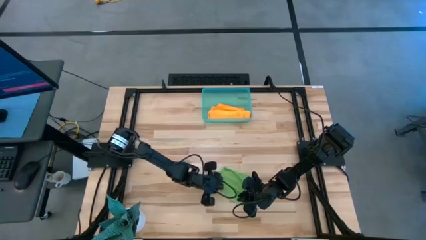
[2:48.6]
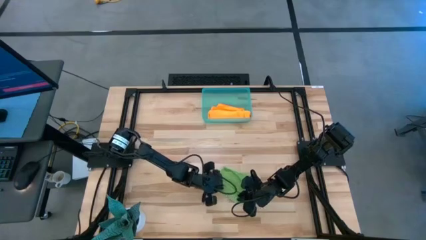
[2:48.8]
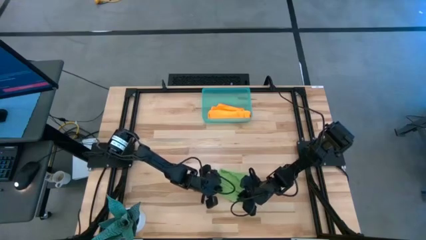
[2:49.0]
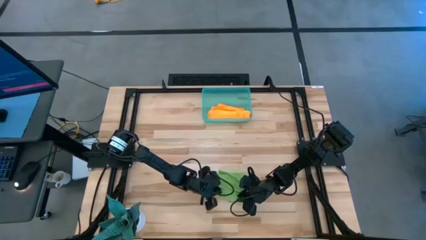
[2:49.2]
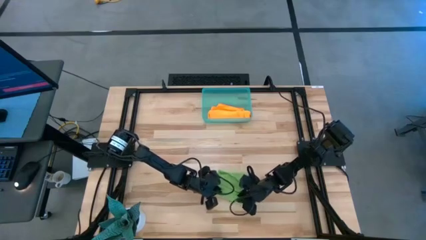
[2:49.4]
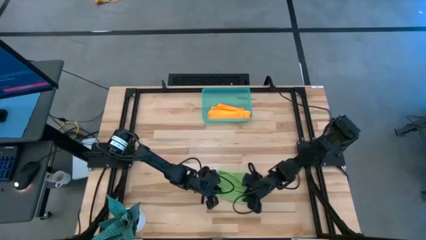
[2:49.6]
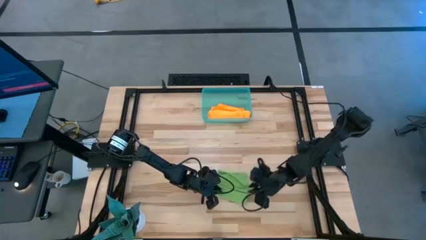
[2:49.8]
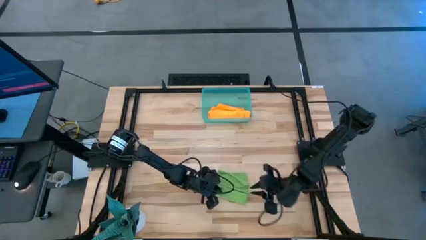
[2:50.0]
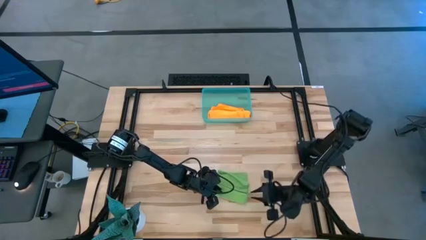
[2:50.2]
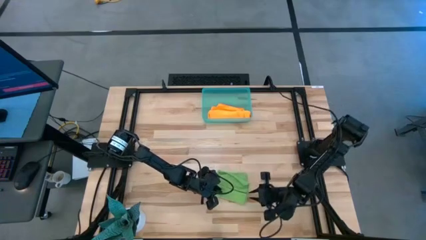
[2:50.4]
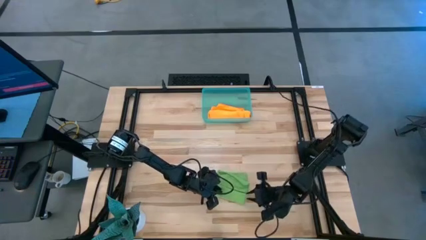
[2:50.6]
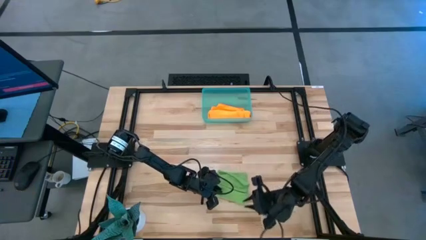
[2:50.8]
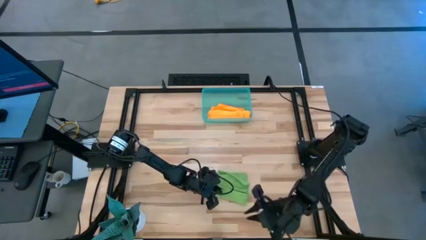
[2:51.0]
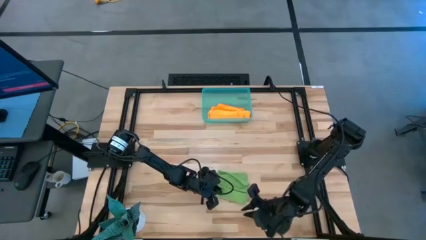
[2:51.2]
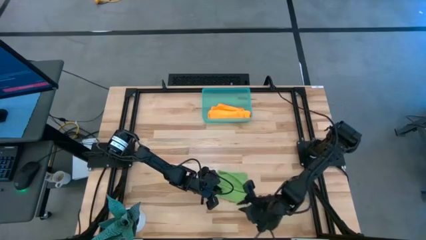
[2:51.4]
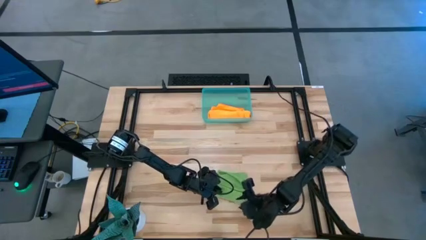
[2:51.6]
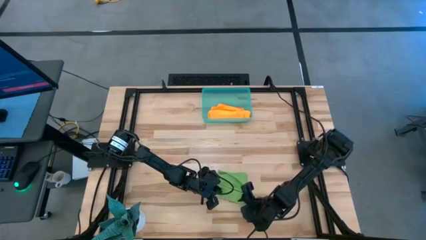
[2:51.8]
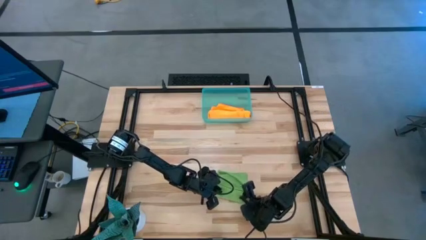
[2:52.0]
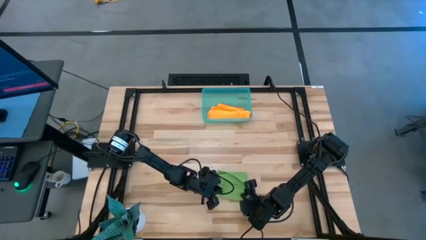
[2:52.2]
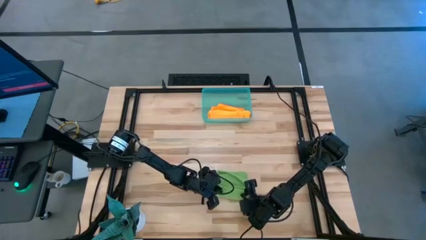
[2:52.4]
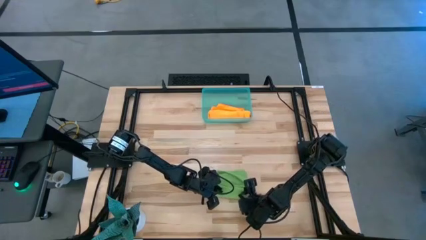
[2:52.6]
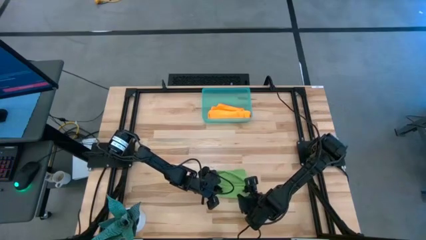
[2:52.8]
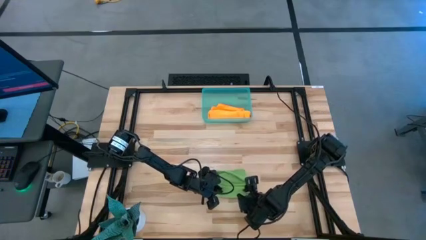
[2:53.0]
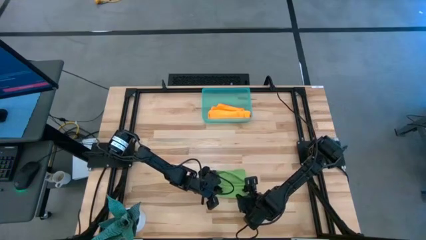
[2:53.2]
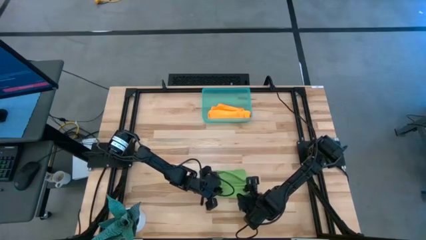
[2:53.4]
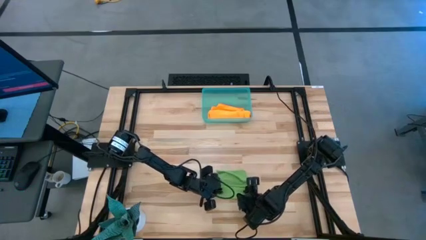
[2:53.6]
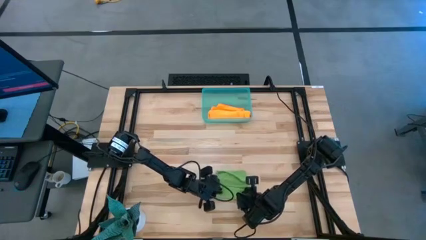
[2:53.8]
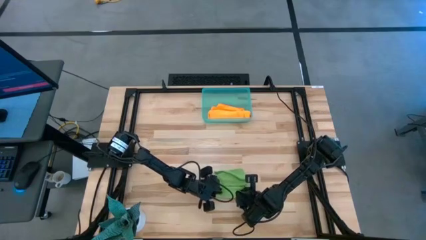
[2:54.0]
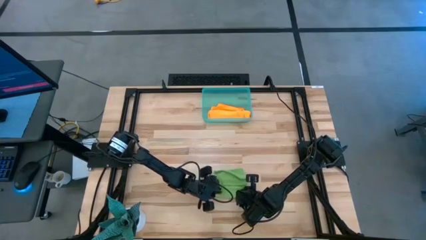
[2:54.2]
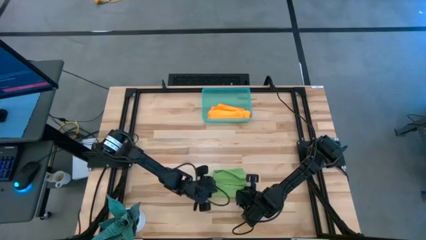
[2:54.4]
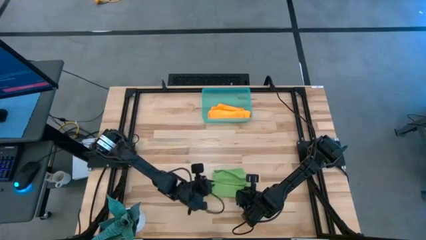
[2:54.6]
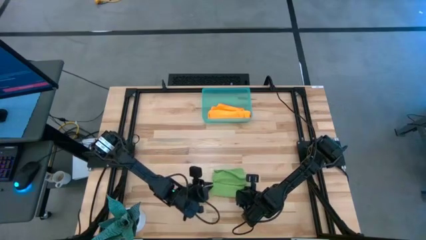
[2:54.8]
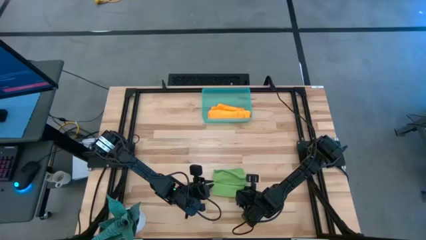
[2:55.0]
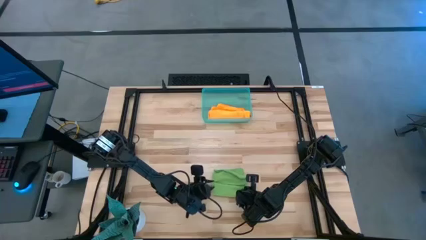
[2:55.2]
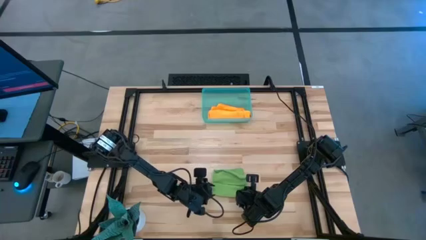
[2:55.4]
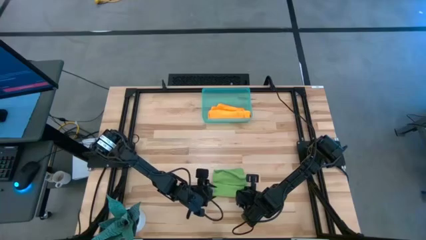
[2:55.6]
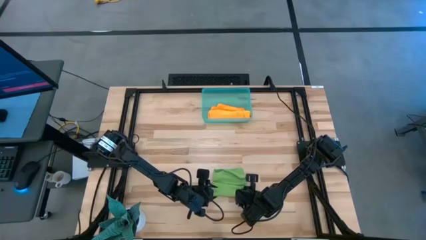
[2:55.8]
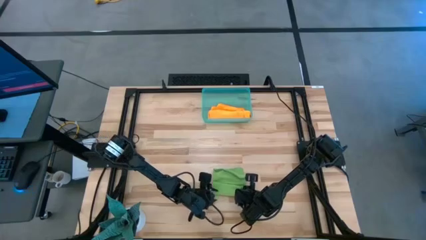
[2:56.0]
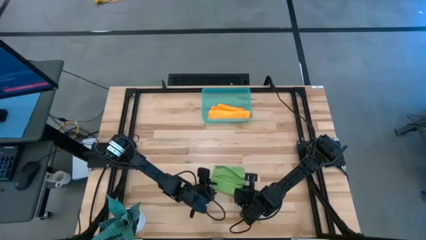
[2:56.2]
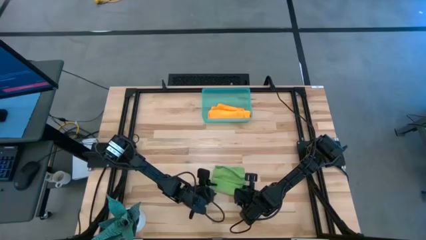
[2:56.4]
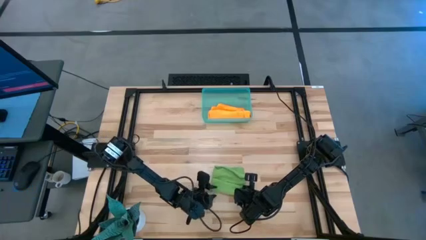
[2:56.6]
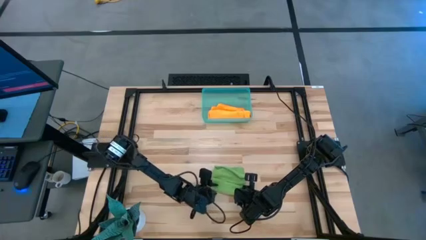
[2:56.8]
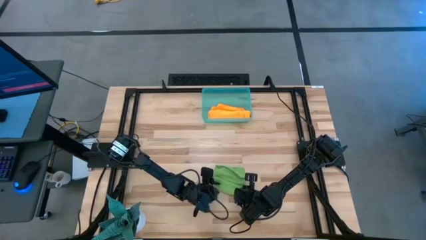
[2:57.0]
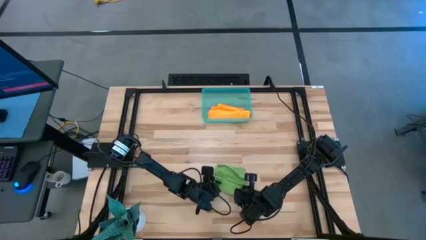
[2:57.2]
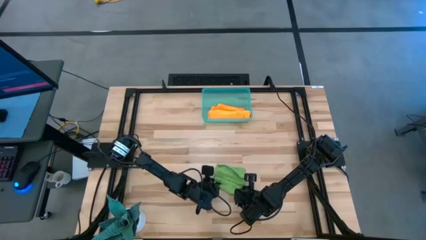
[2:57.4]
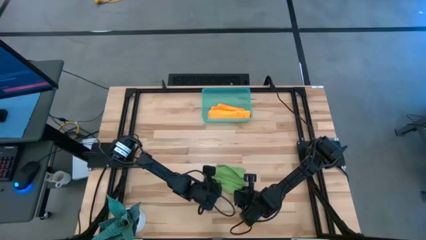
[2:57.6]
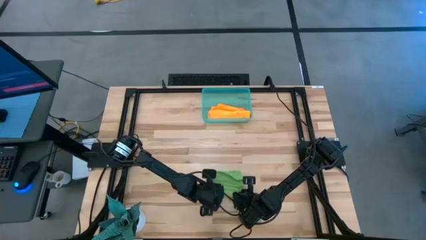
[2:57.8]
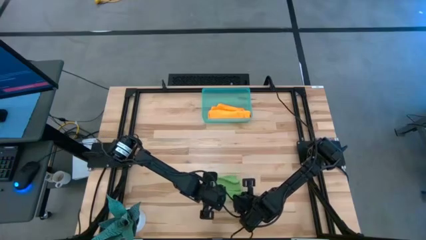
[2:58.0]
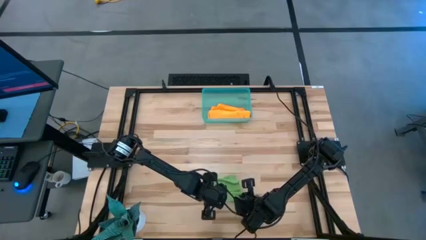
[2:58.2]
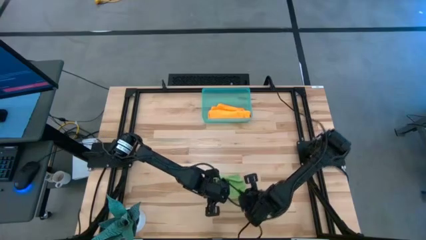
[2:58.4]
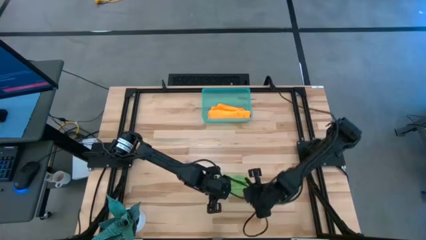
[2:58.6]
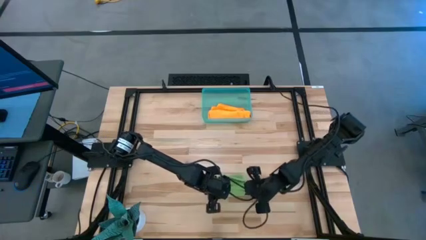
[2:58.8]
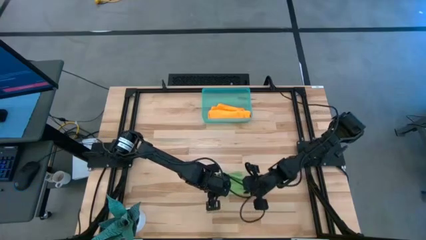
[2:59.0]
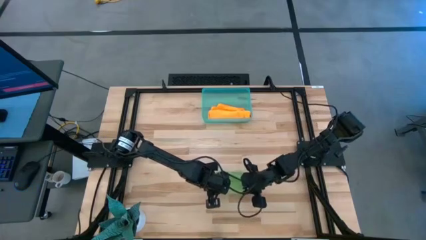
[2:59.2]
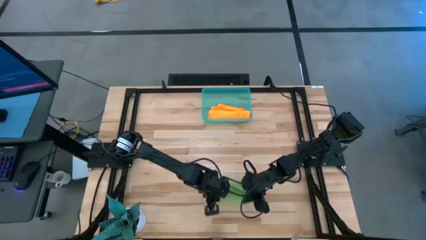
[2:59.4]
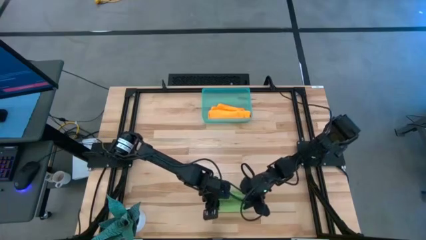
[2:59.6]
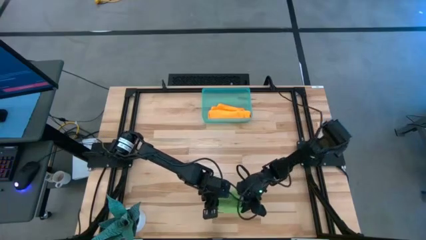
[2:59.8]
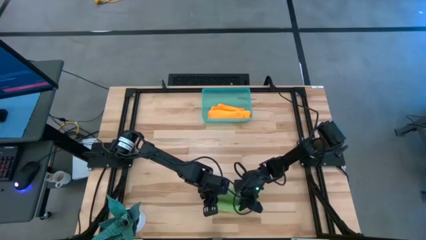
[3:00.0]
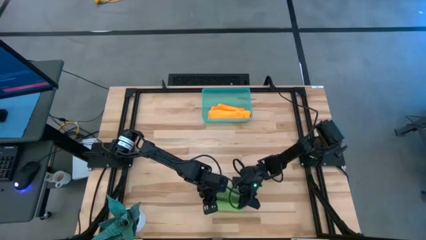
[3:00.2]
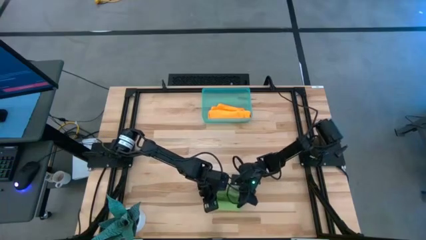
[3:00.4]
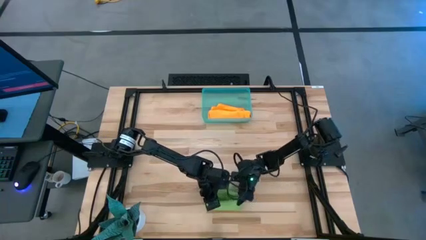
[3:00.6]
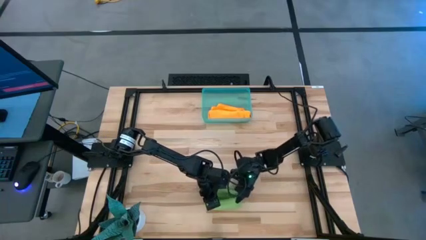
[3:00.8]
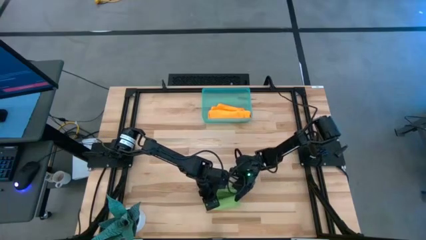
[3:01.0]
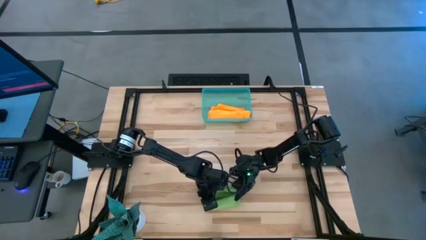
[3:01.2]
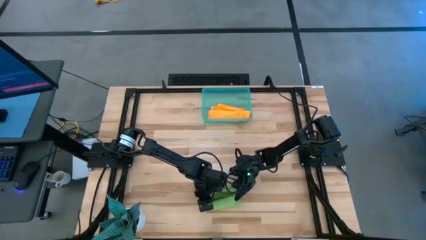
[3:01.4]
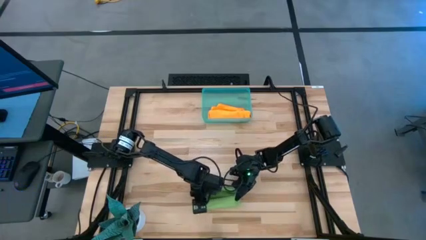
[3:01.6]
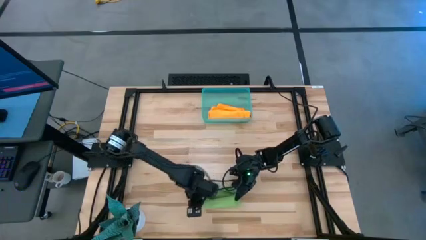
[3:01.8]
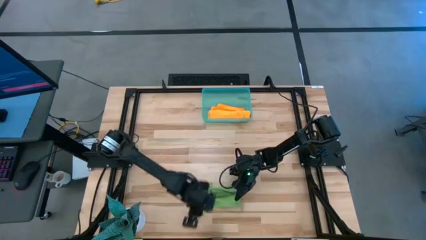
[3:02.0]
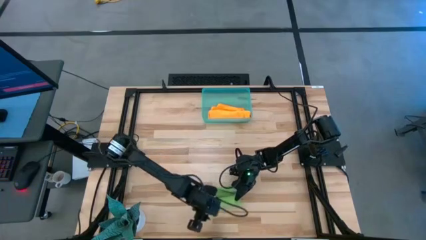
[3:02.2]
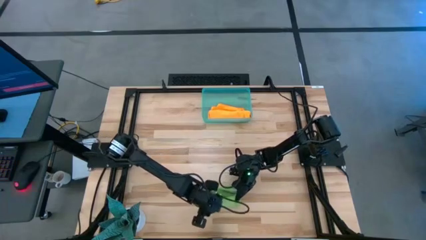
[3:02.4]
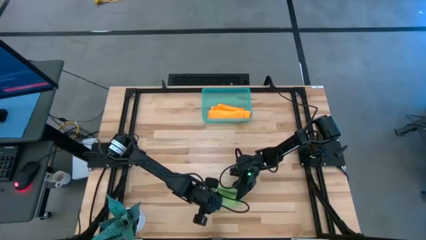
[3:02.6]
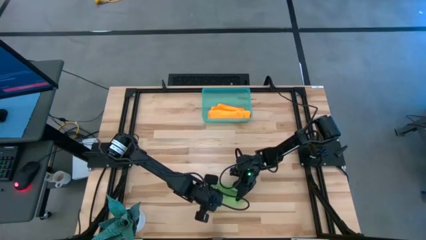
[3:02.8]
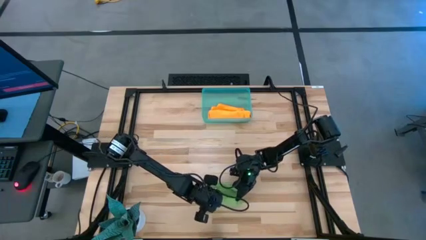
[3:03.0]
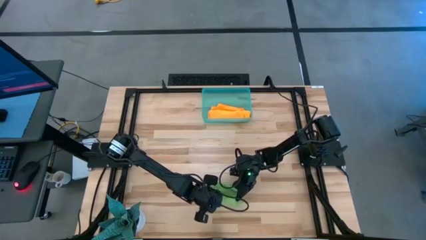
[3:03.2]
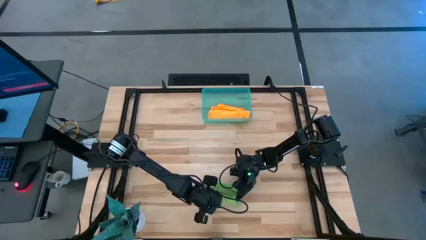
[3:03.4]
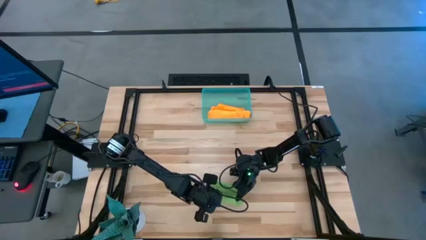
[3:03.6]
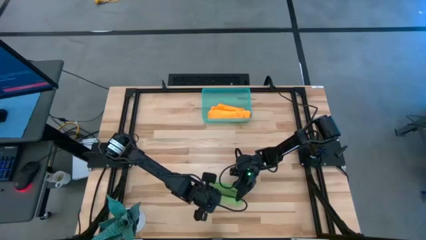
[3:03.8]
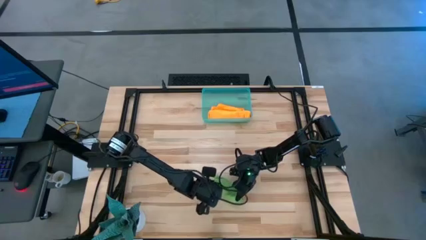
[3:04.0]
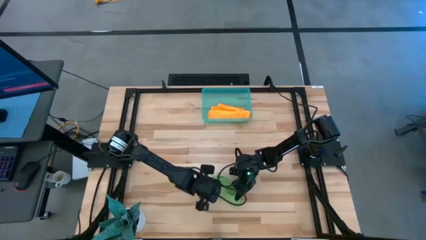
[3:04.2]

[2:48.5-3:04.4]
Task: Roll microfiber towels into tight, uniform cylinder then place into a basket
Roll the green microfiber towel
